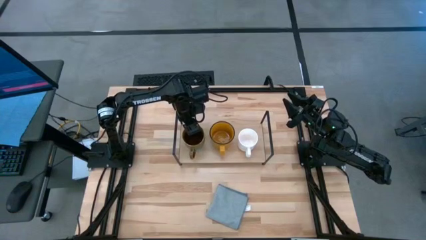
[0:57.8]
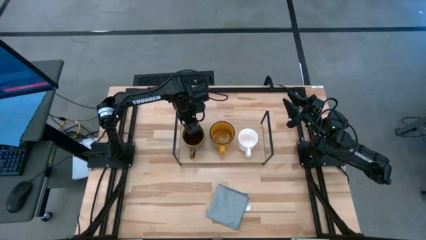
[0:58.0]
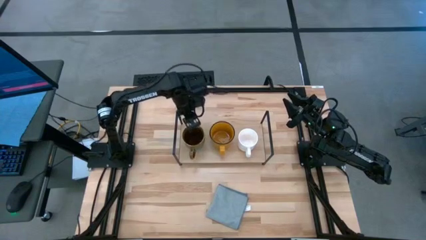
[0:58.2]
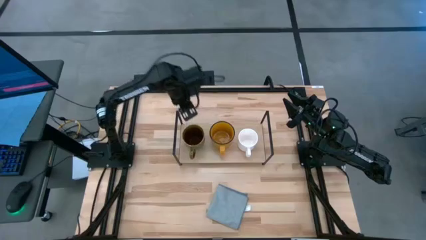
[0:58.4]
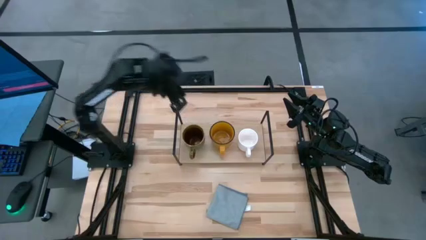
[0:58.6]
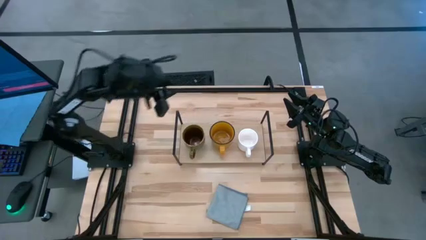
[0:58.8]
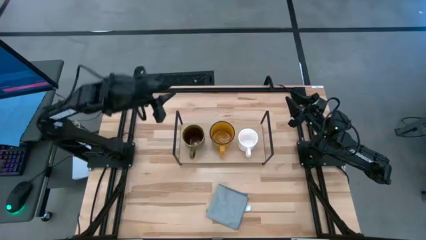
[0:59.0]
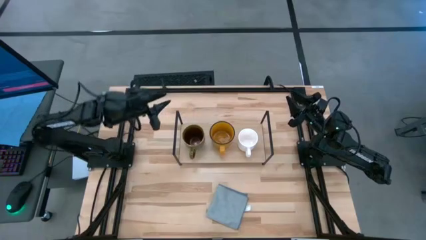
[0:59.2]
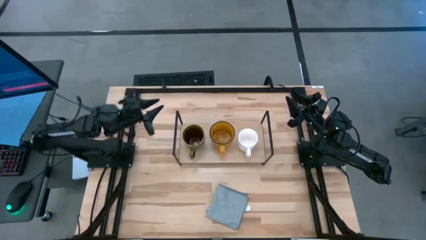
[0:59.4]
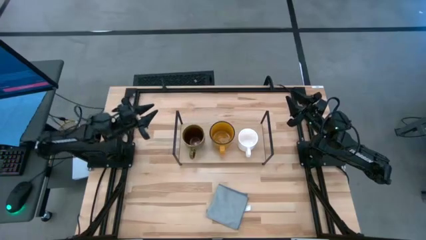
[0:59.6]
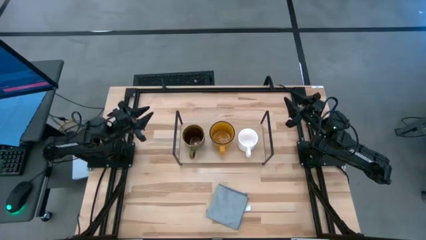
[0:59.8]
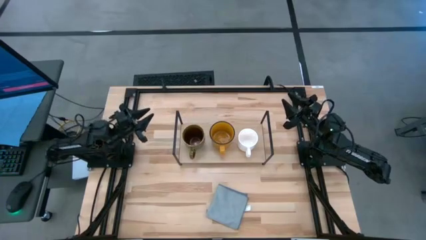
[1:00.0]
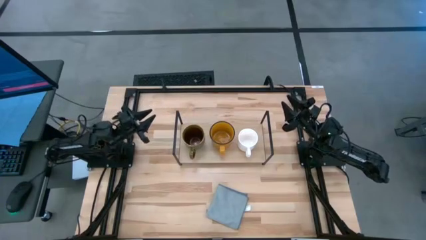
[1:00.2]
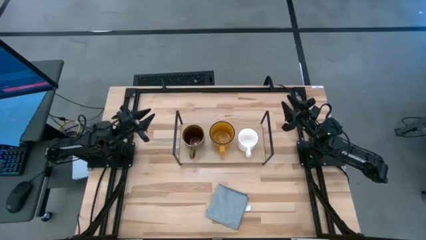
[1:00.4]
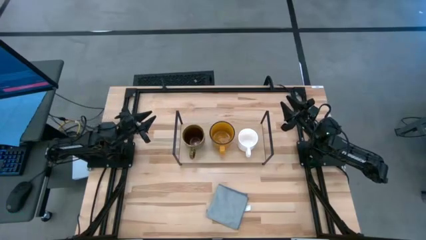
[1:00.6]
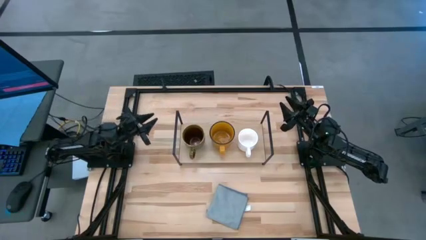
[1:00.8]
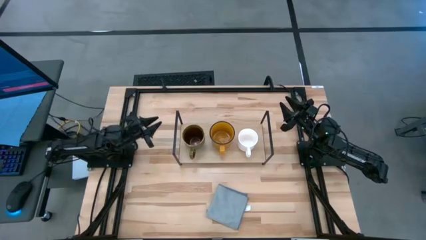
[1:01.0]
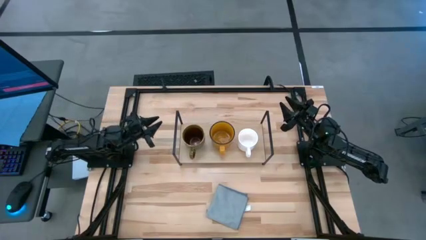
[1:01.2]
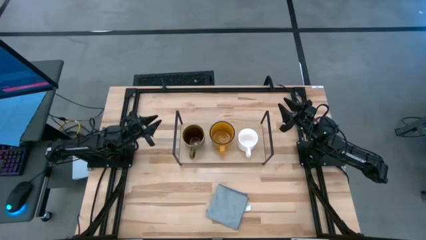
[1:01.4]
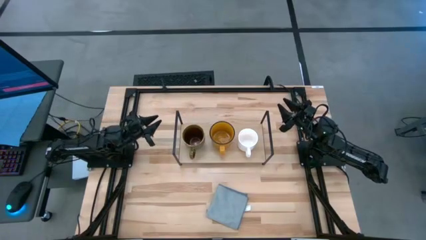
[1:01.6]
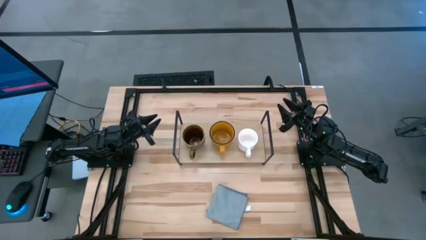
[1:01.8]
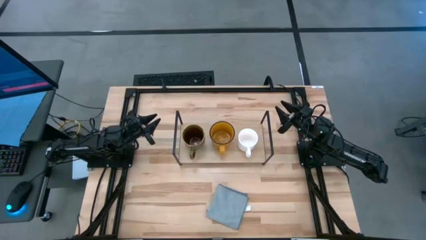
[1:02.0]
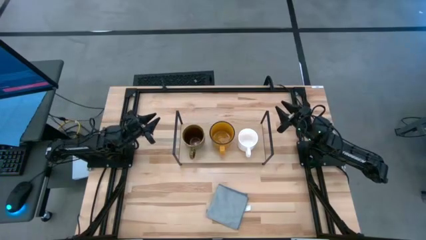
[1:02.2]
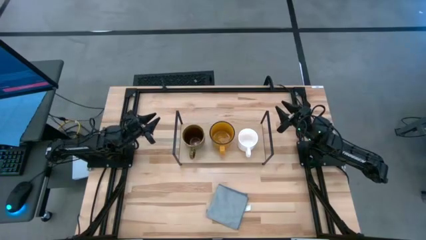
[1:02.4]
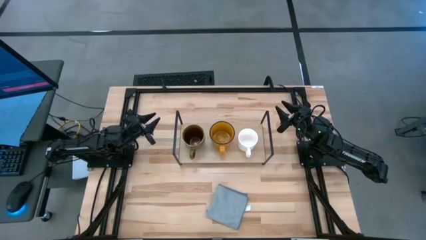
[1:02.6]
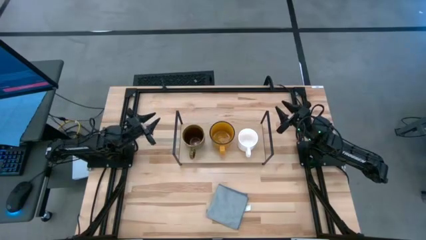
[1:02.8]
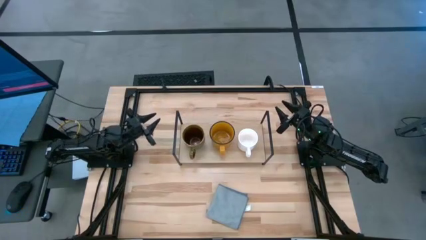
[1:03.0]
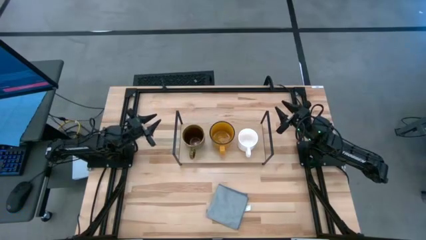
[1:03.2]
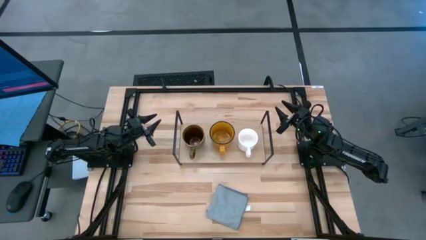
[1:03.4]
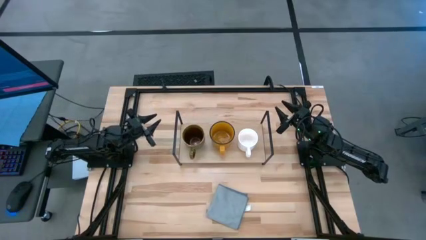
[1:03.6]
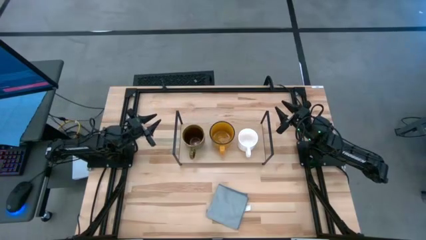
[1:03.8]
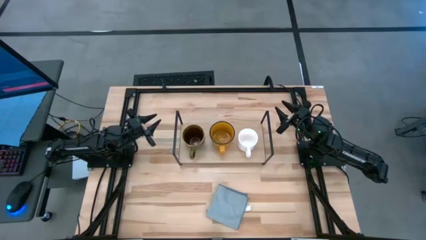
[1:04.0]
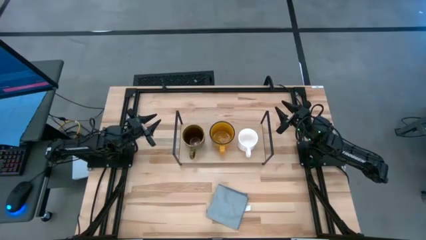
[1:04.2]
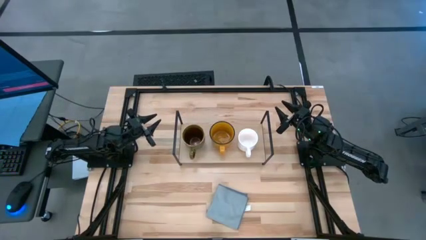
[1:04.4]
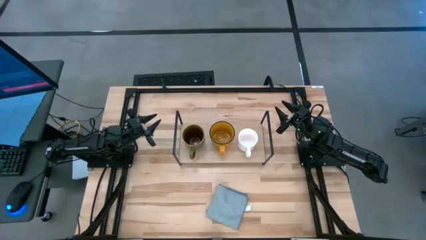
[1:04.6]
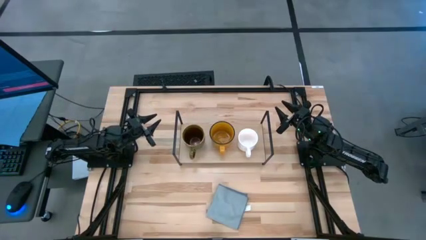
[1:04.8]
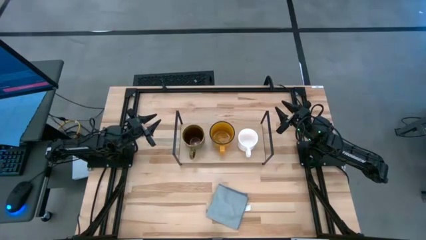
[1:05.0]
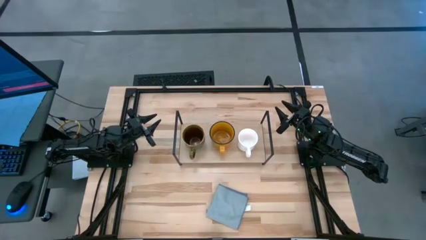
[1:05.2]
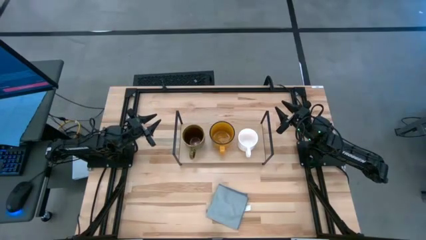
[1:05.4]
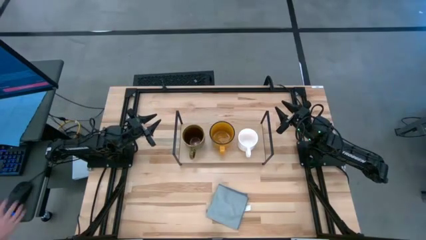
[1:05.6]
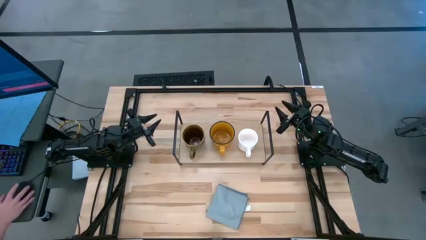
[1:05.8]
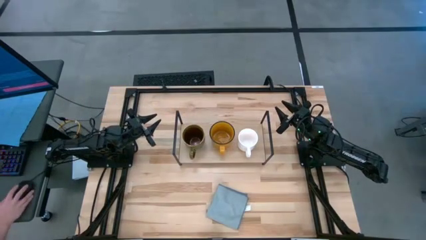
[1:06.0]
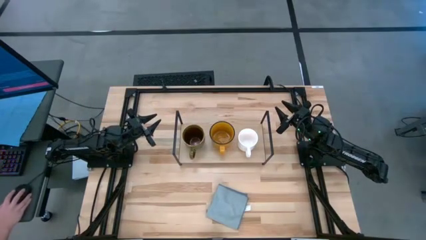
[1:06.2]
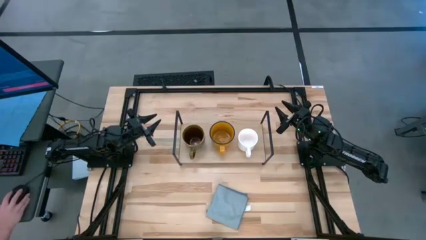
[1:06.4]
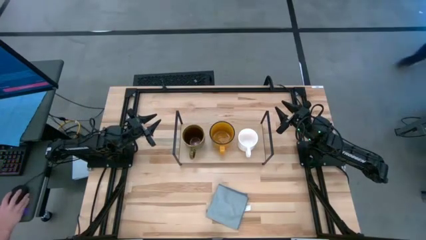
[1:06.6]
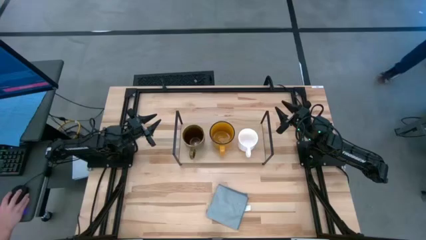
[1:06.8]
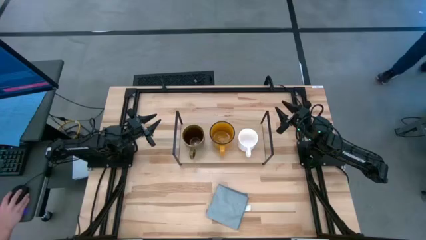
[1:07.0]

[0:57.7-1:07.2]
Task: Stack small to large cups/mugs on shelf
Return to Home Position
